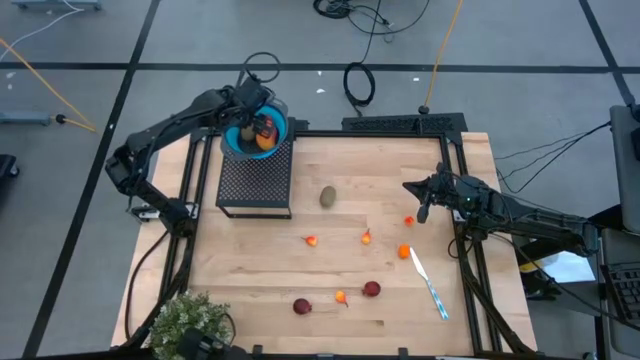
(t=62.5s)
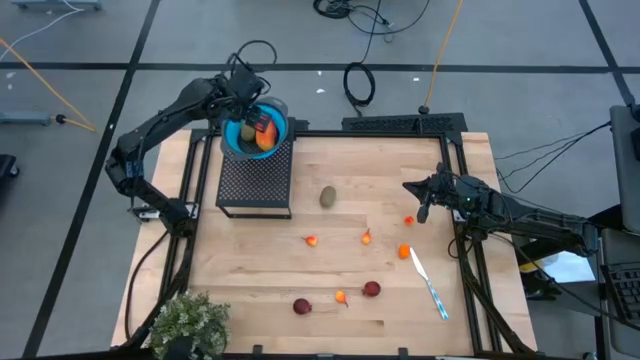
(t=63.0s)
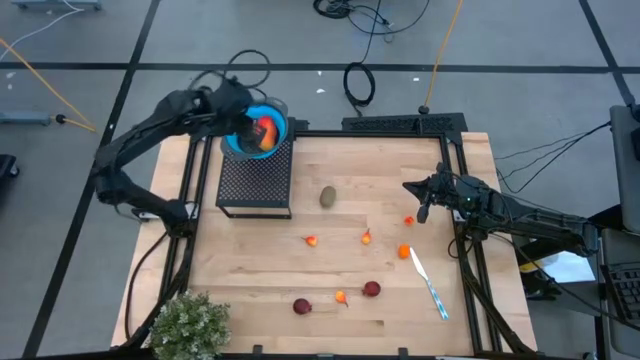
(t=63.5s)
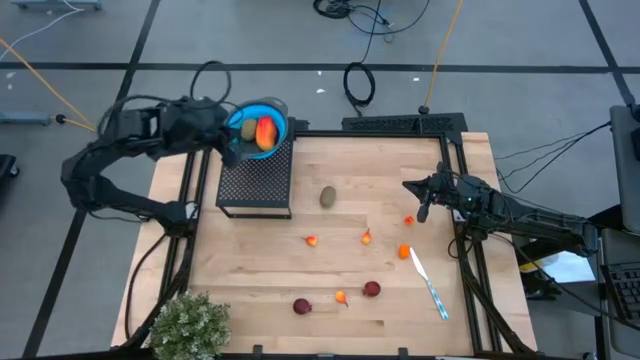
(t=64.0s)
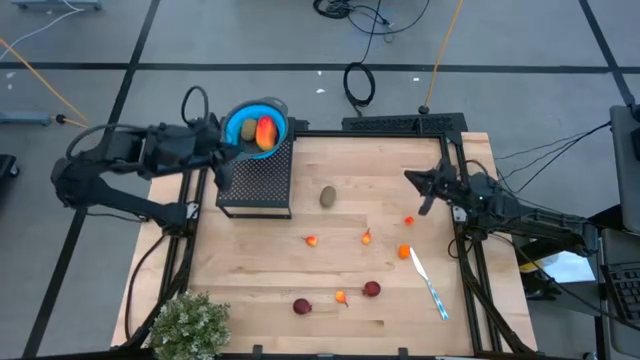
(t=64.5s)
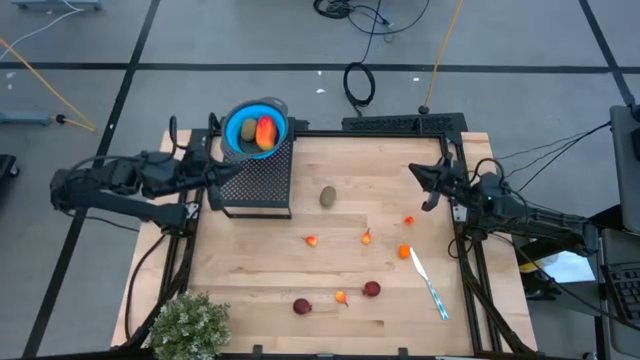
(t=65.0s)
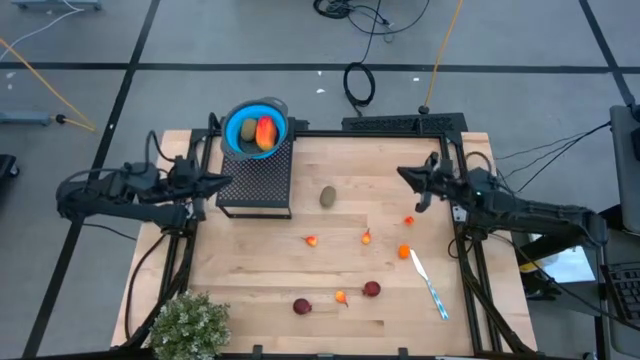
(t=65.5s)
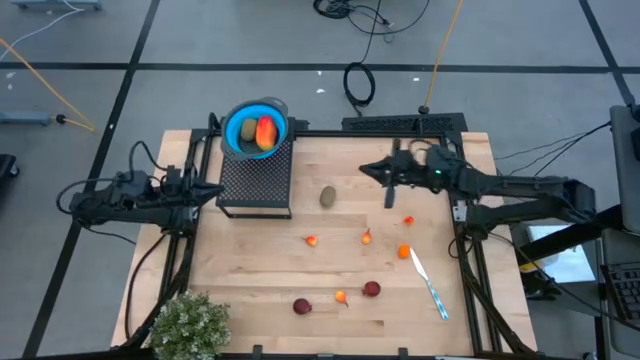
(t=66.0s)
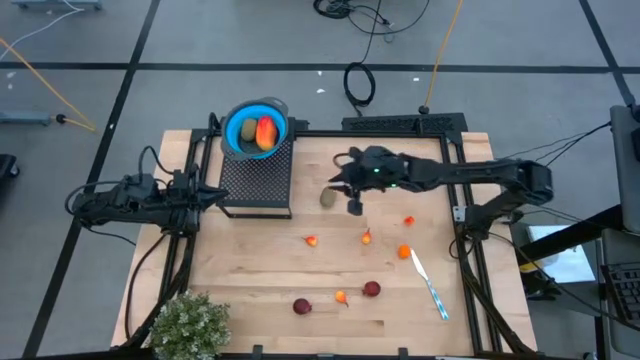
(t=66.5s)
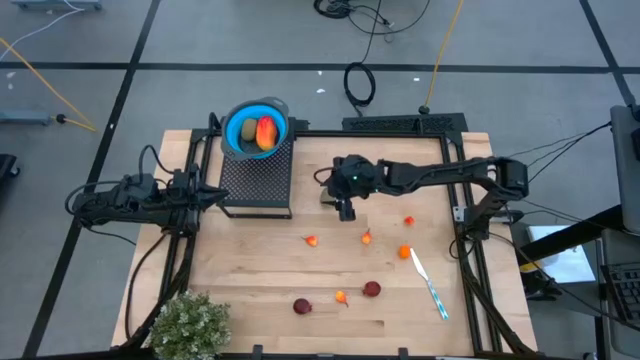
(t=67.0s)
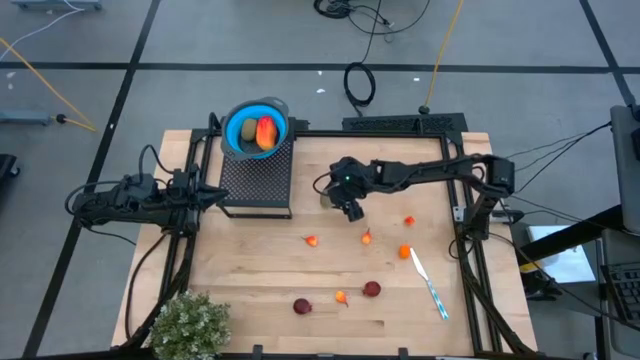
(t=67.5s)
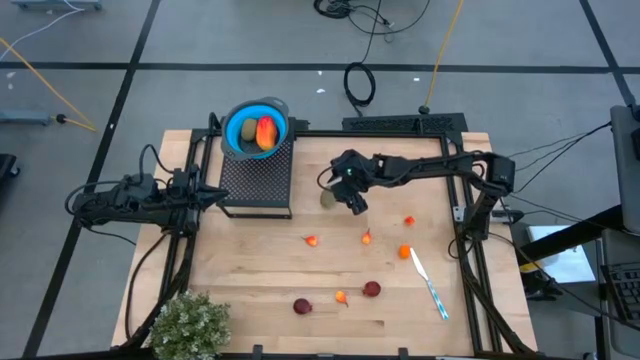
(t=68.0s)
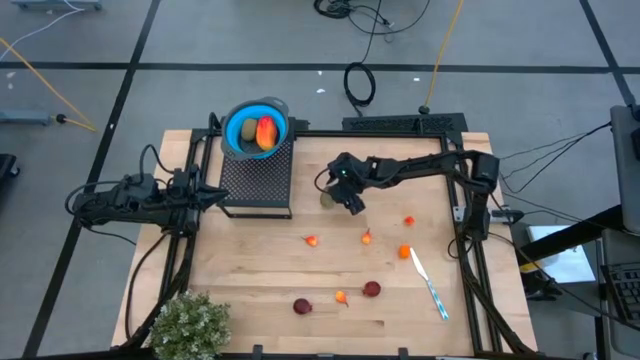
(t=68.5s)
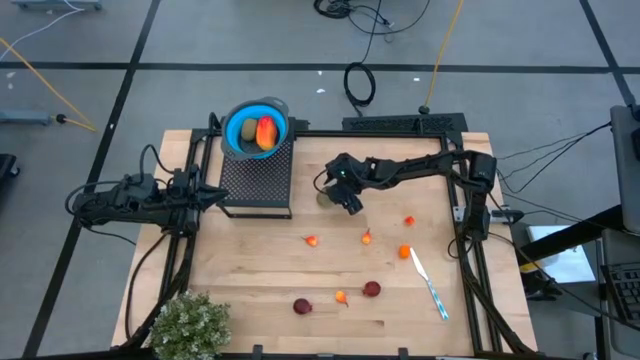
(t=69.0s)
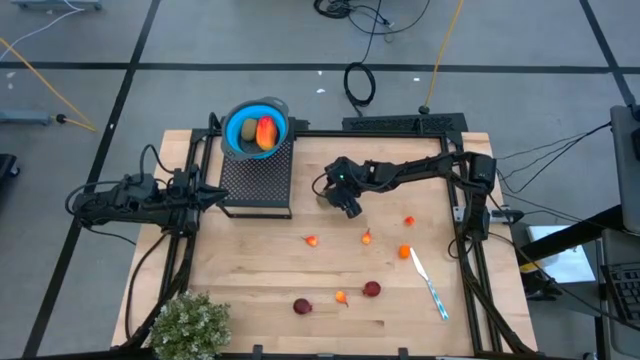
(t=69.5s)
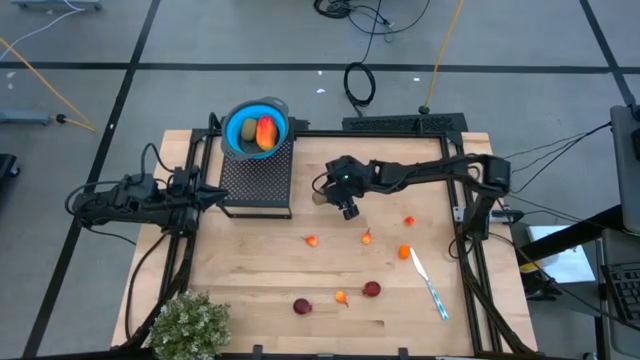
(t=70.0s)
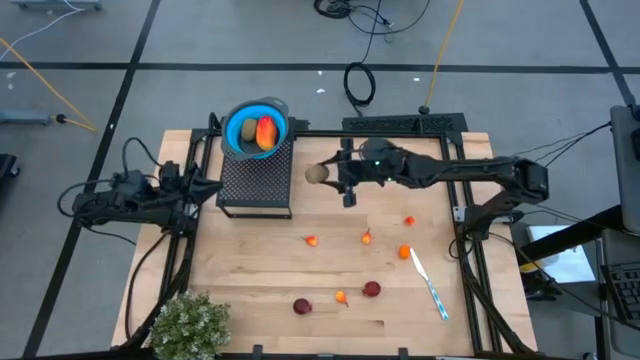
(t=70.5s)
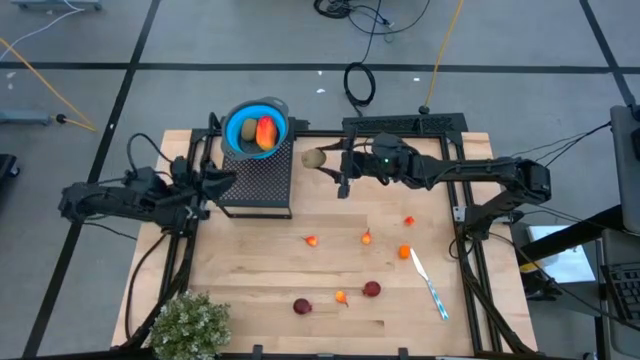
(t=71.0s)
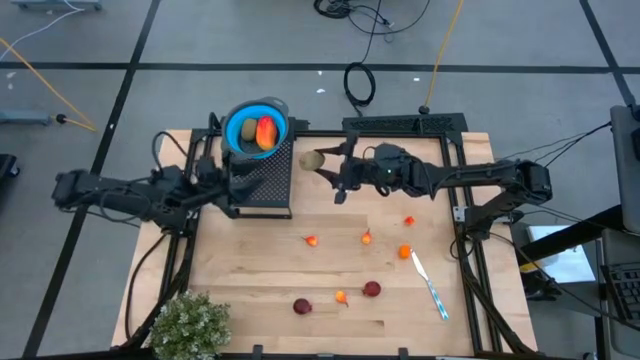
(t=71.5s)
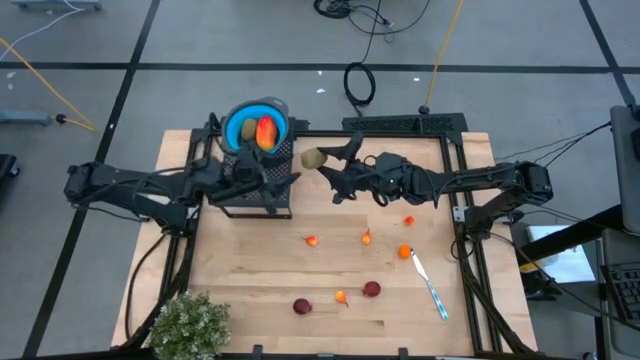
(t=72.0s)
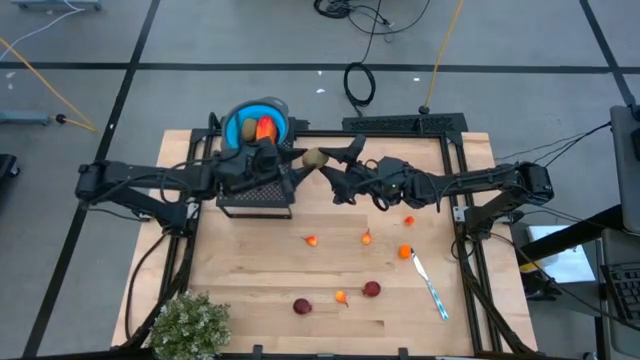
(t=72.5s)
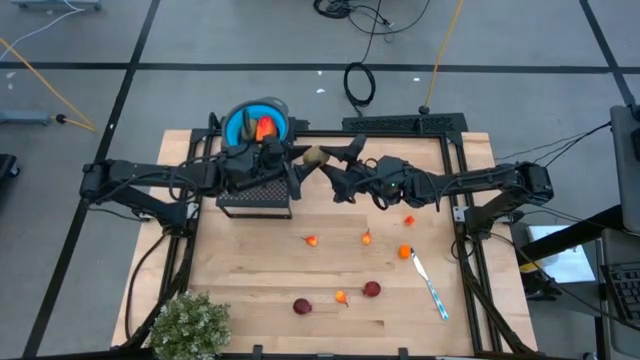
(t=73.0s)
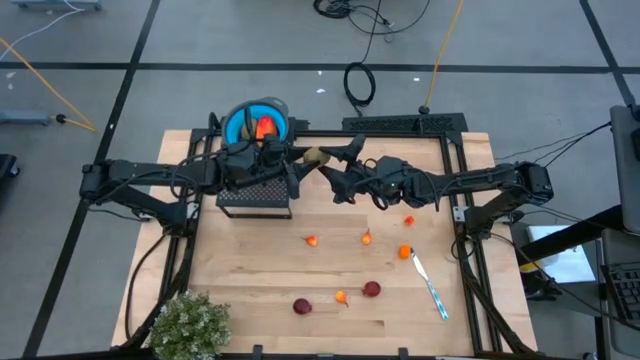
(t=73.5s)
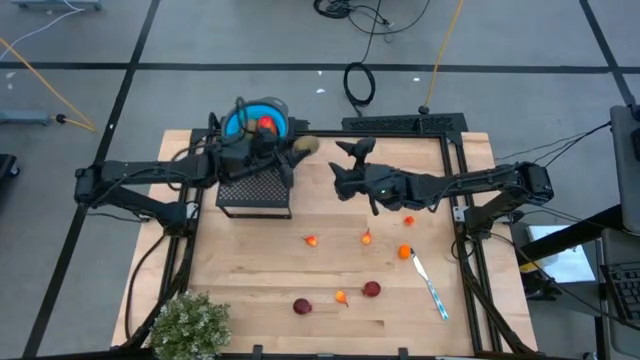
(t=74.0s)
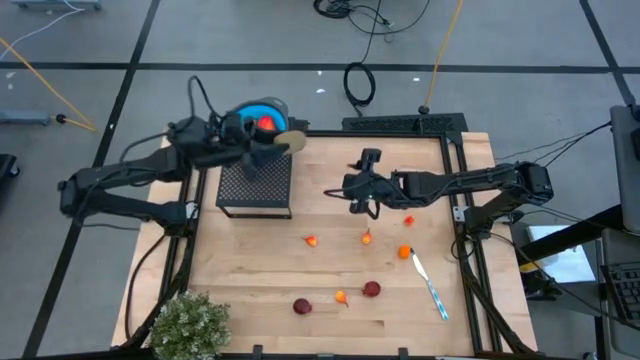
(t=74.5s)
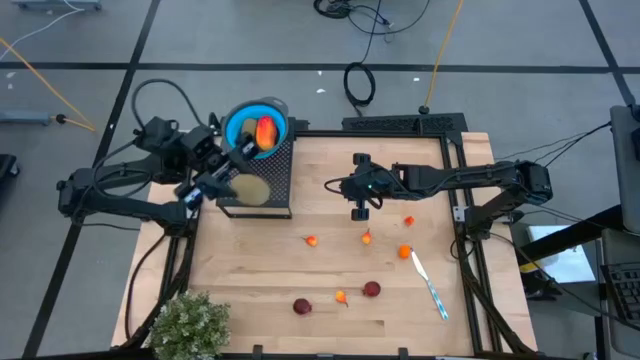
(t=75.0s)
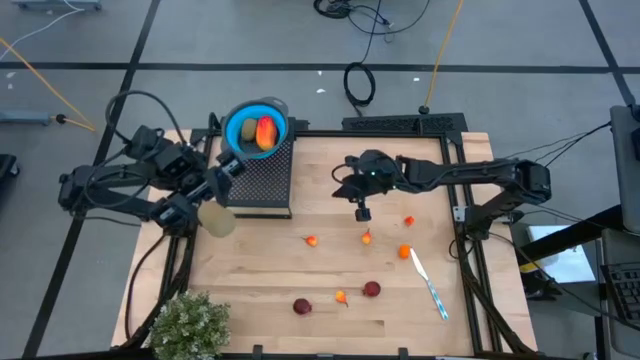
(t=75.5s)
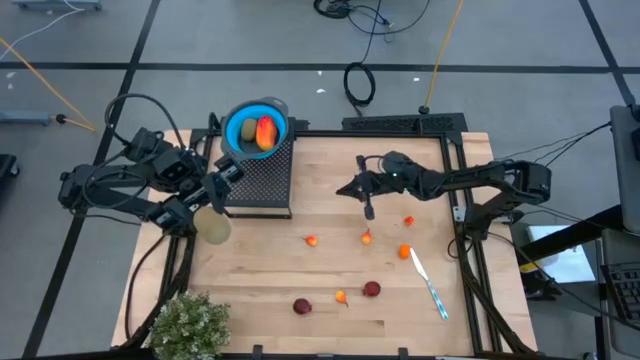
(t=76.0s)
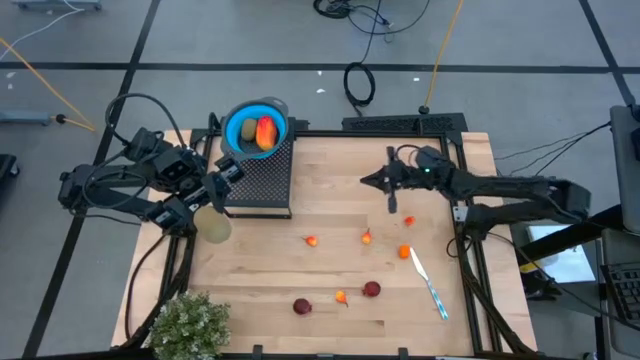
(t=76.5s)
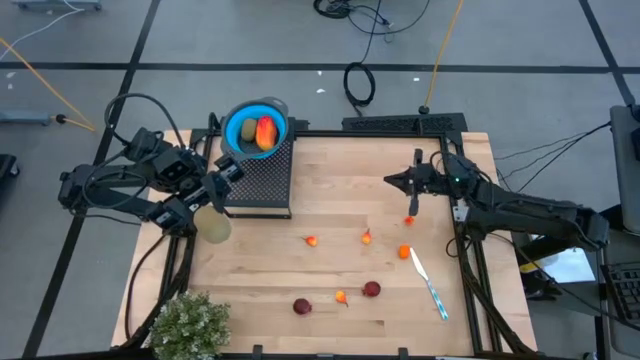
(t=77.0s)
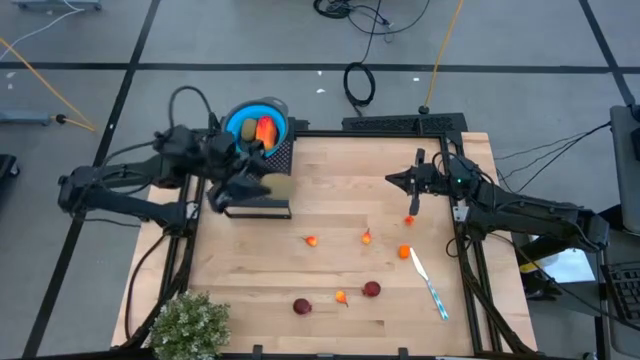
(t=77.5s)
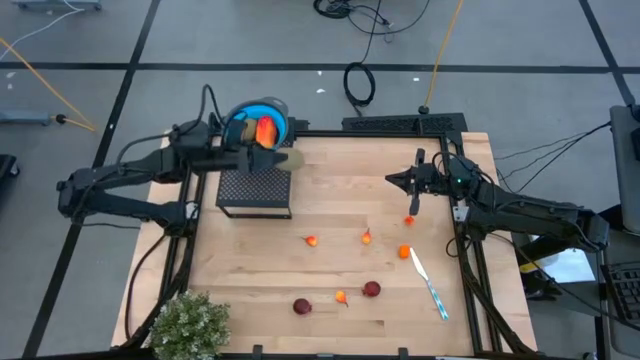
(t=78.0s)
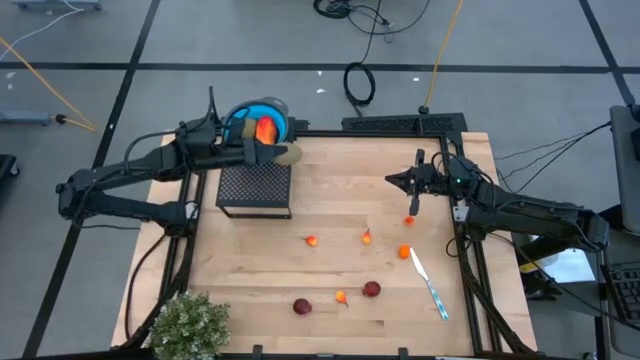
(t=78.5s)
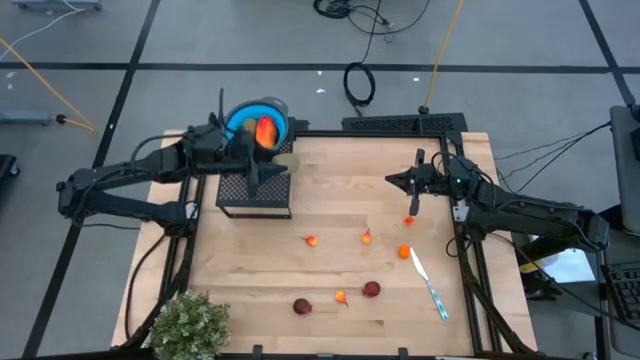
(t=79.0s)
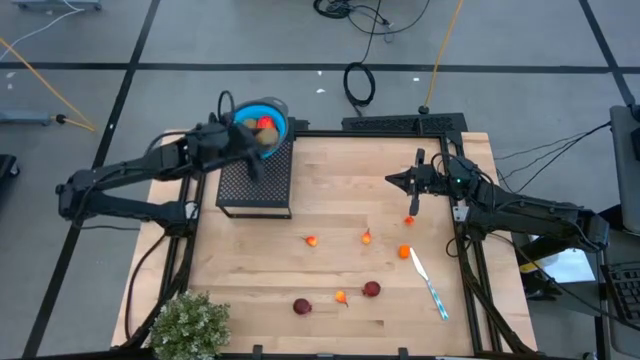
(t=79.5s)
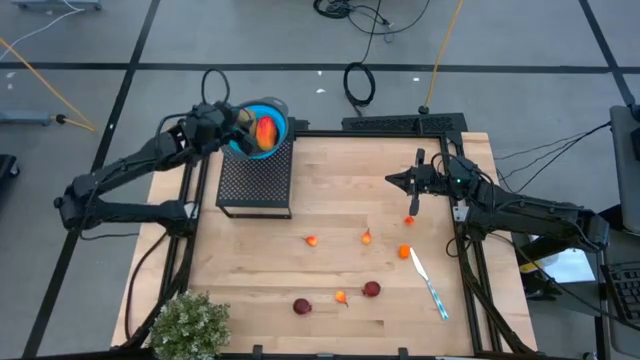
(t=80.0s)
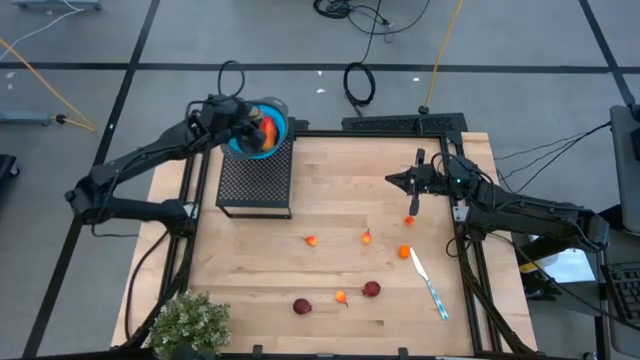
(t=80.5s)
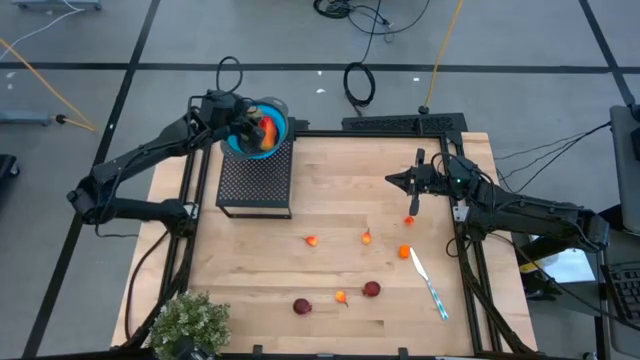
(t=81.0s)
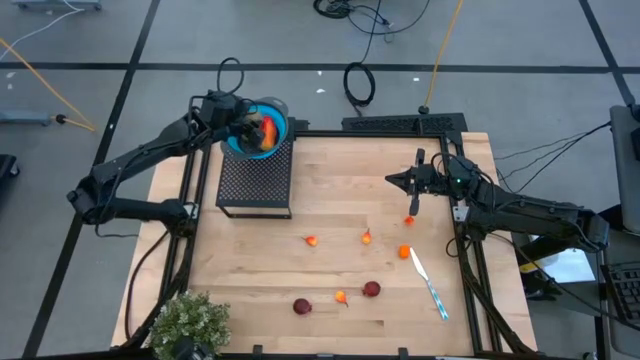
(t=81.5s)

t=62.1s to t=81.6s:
Task: Pick & Place Fruit
Put the kiwi into the blue strainer bowl on the shelf
